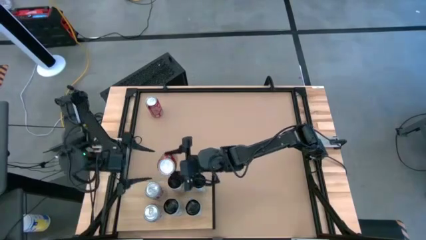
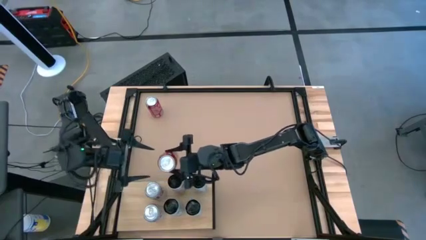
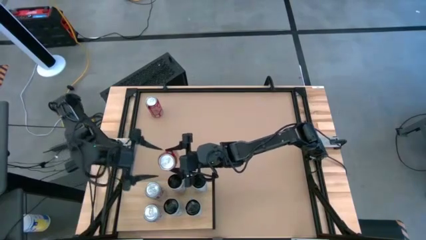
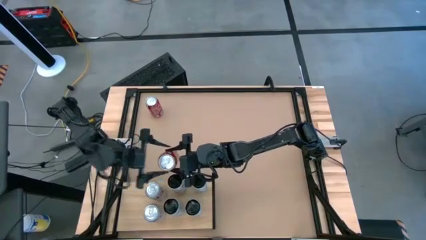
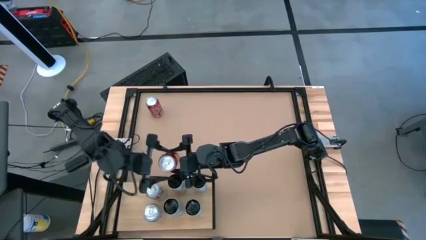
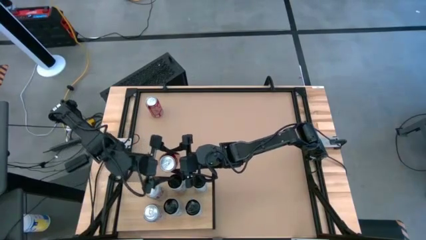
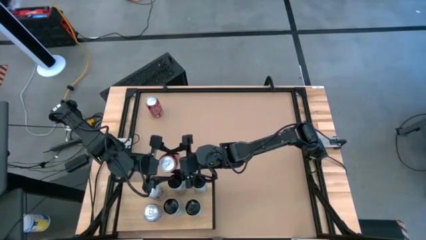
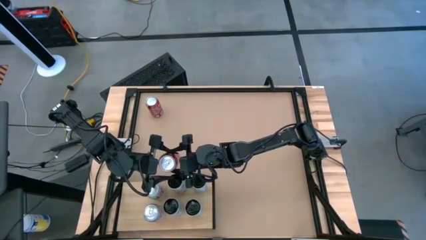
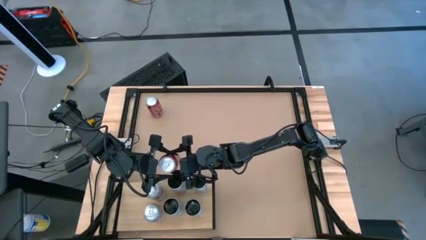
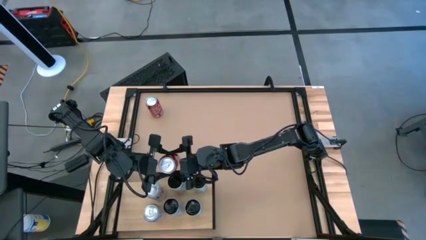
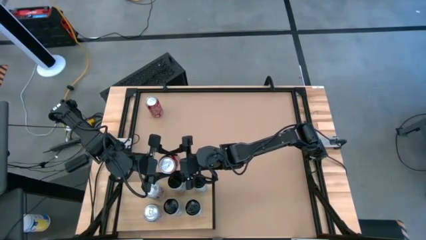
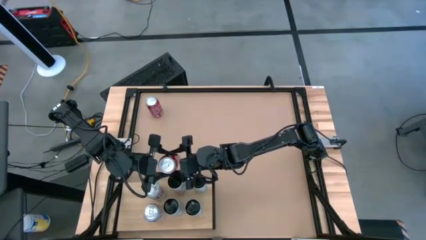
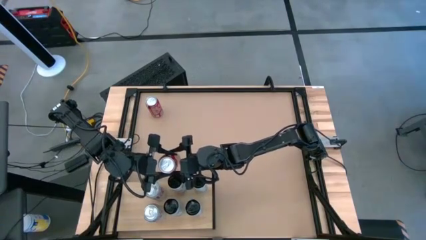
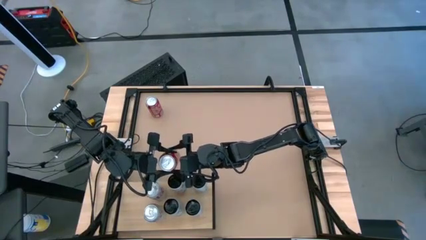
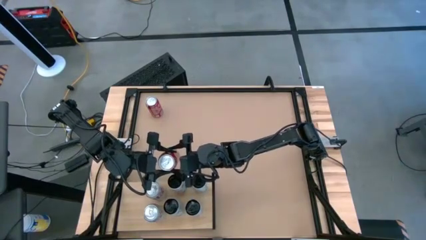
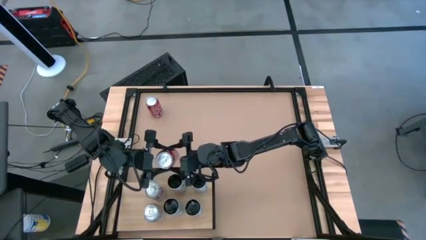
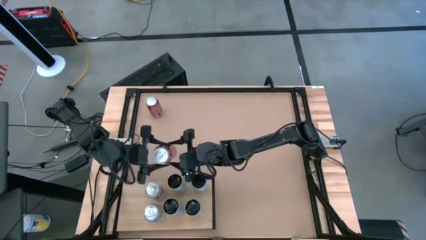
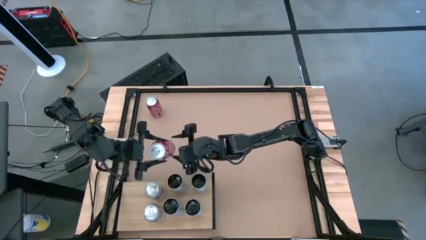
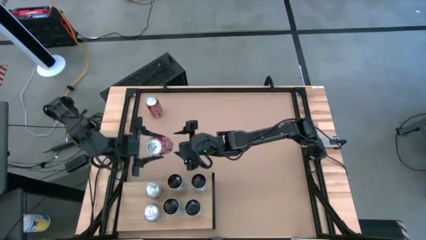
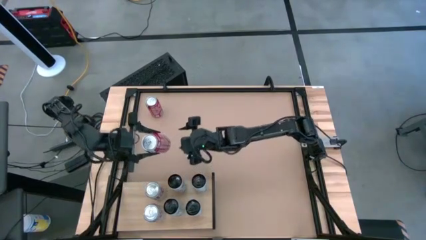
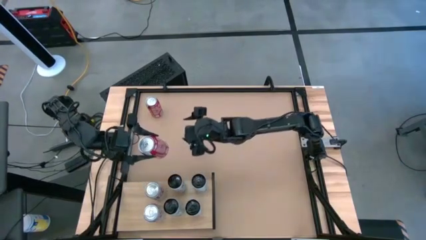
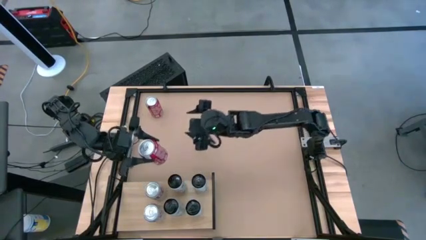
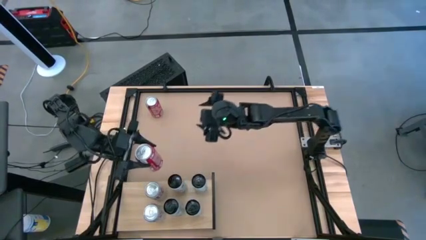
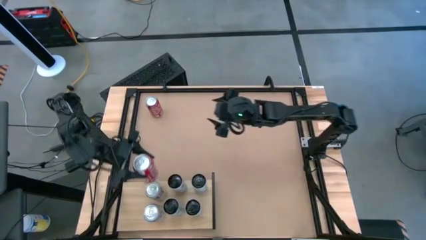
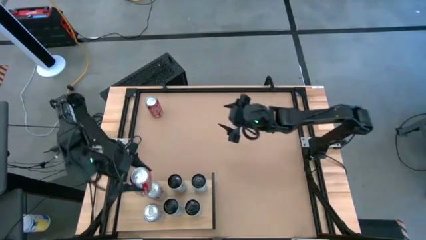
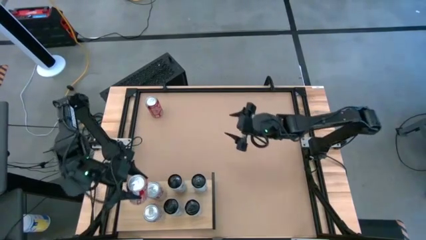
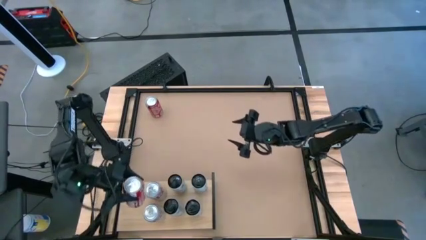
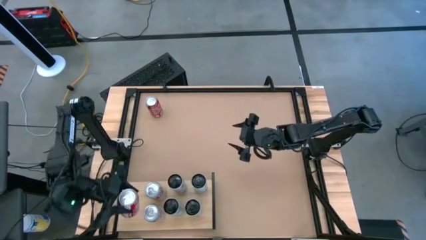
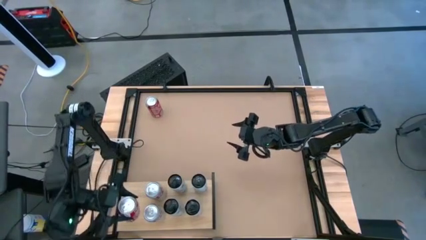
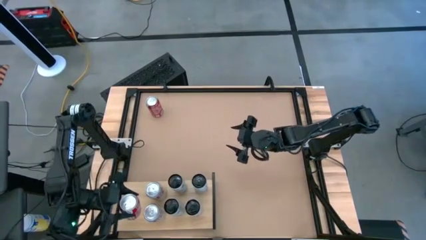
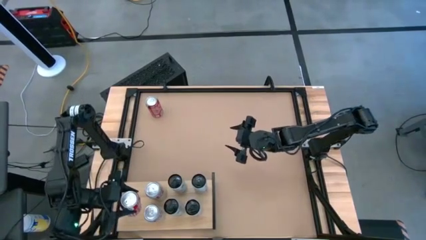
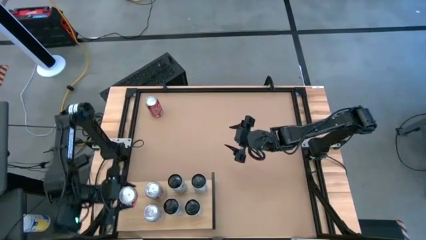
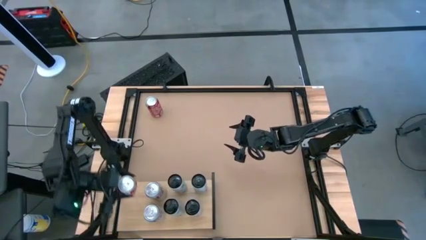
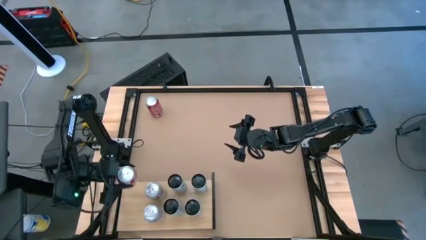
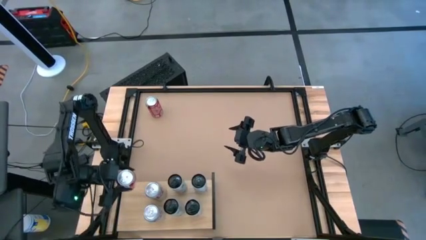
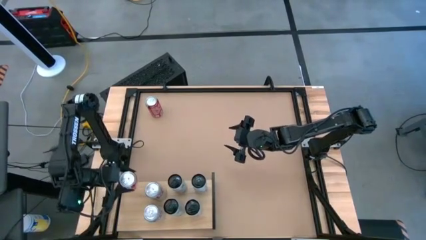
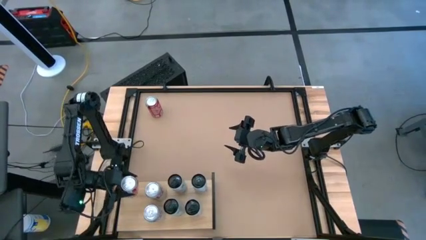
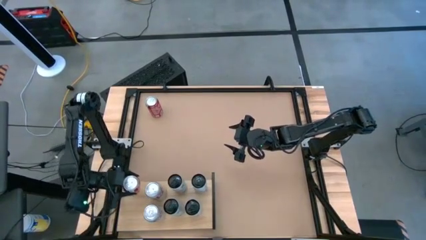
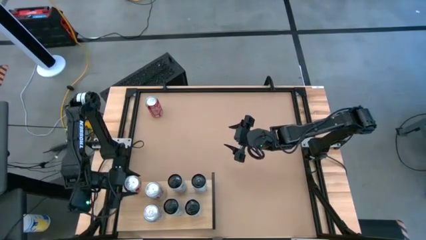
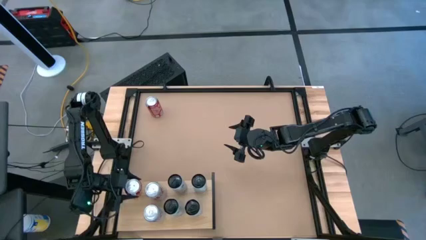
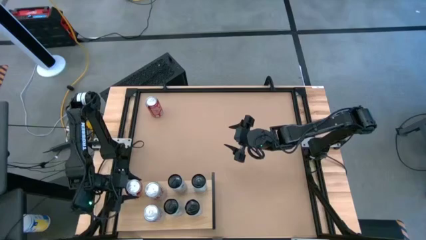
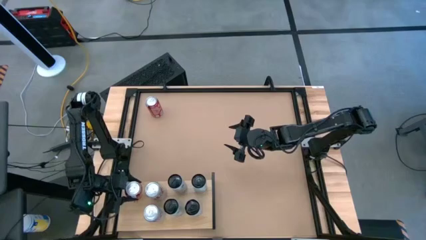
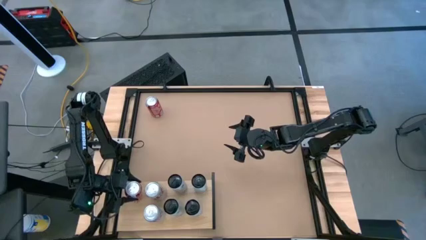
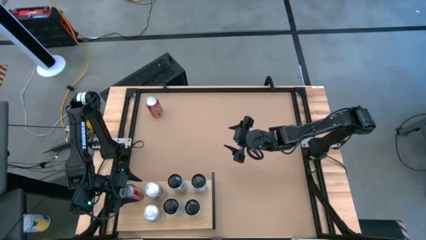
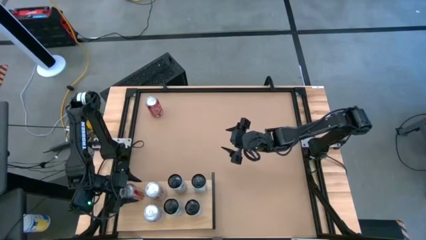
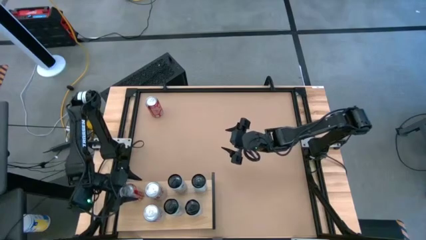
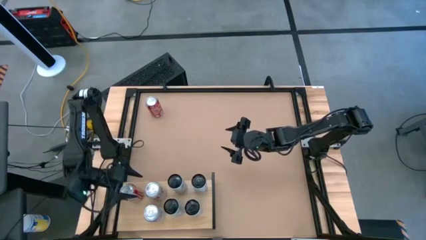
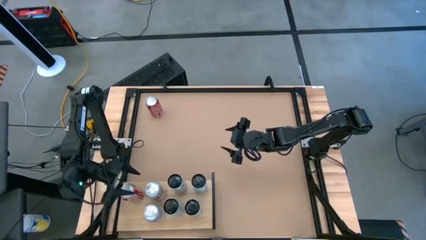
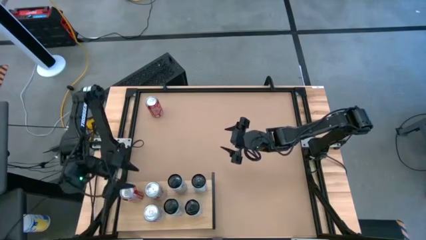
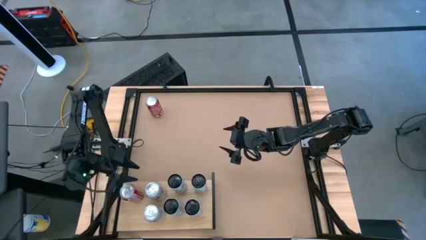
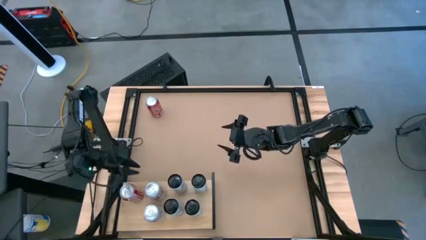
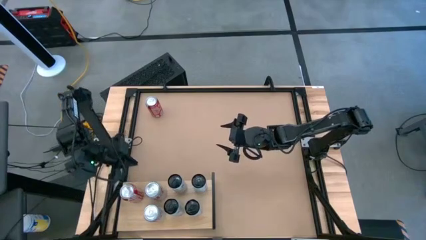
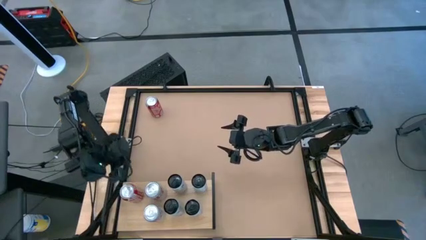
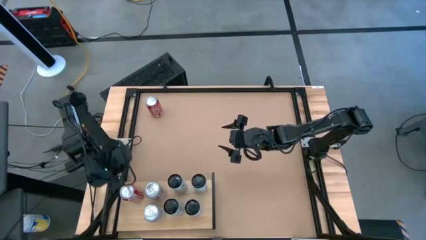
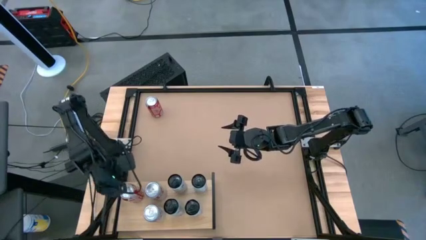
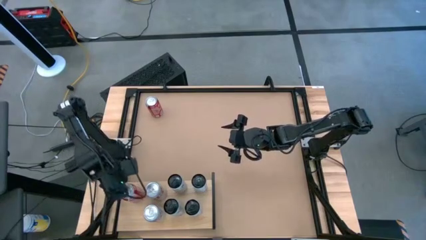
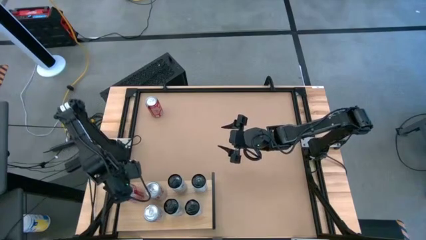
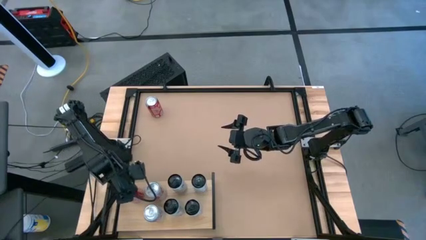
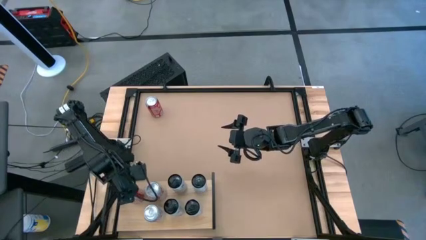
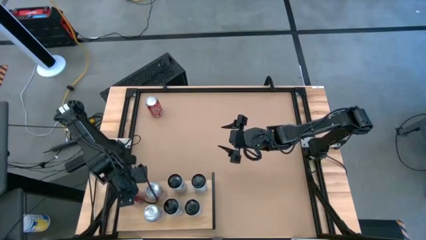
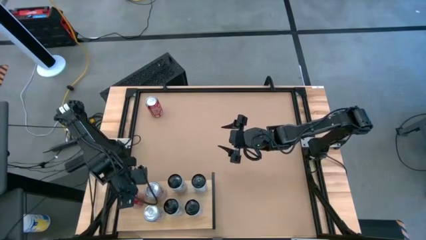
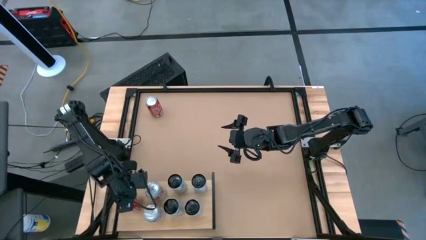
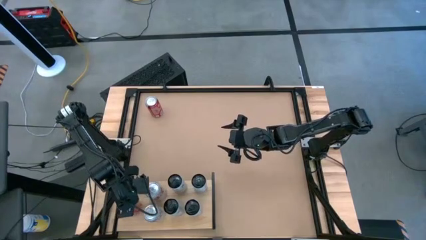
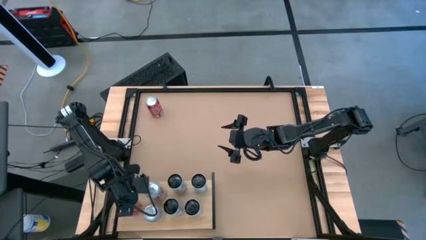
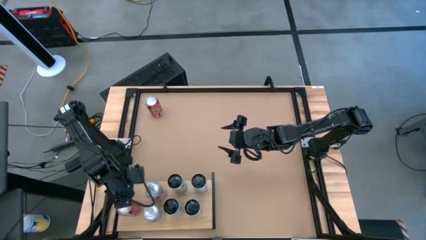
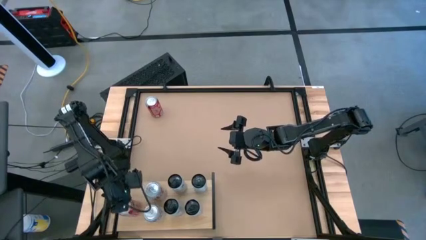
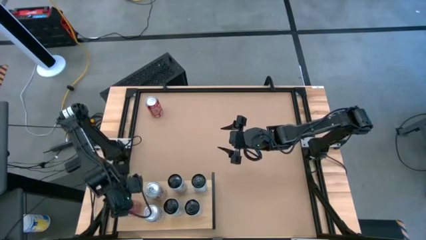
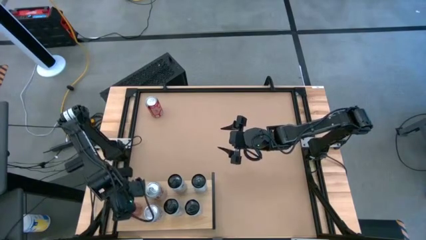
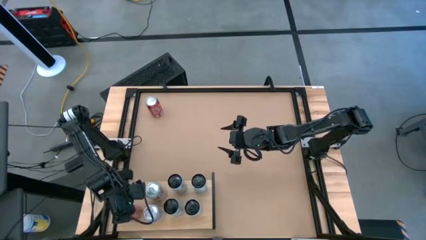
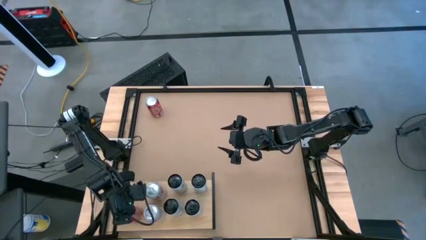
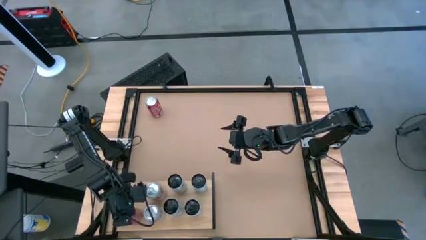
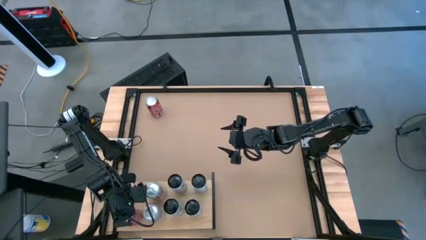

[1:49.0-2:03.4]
Task: Place canned beverage on shelf
Put the right red soda can on the shelf
